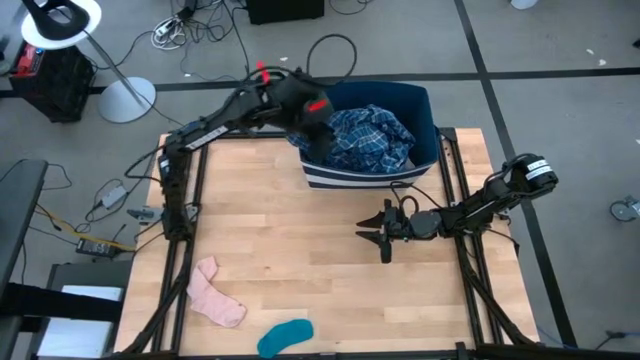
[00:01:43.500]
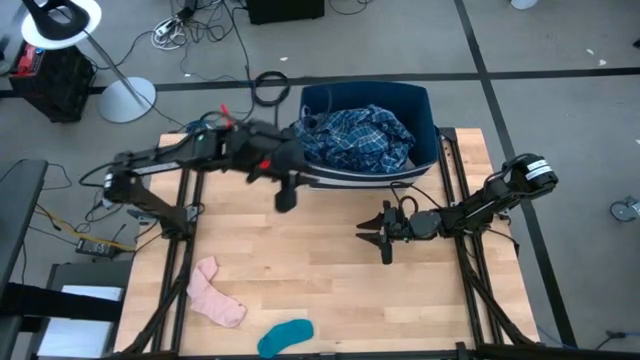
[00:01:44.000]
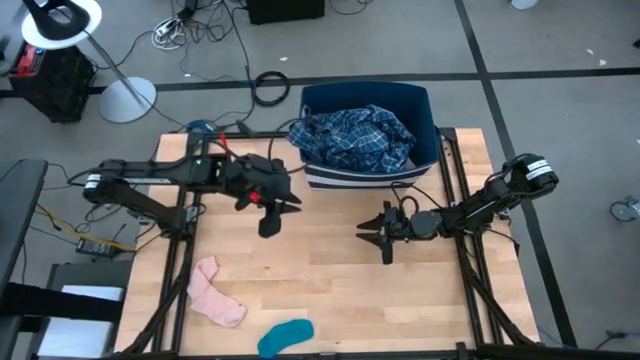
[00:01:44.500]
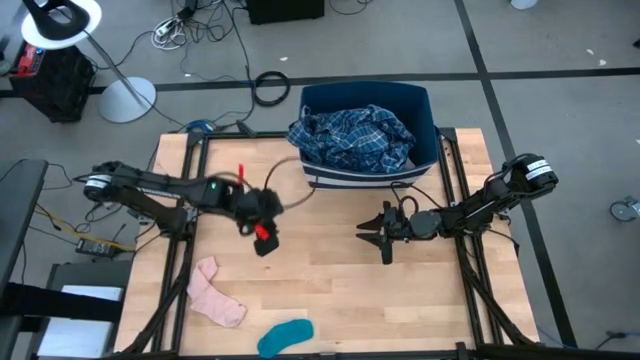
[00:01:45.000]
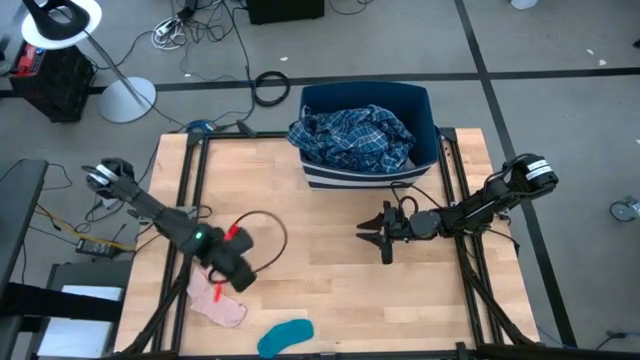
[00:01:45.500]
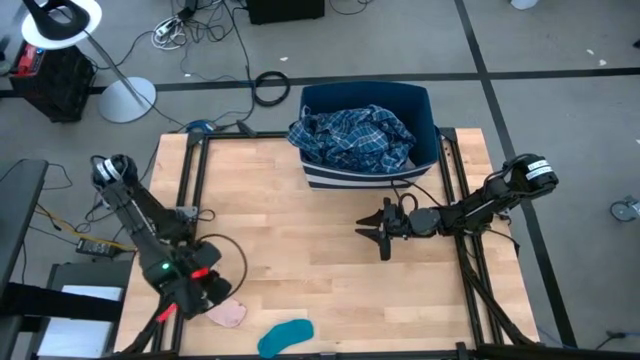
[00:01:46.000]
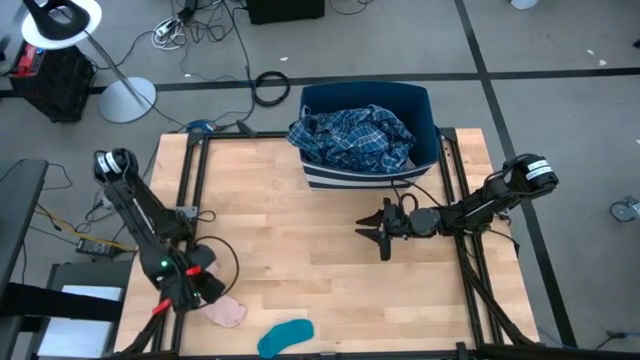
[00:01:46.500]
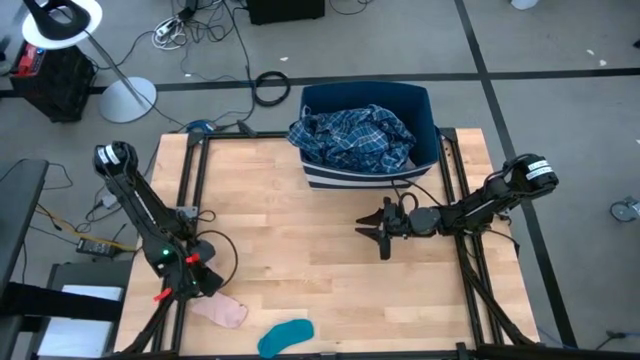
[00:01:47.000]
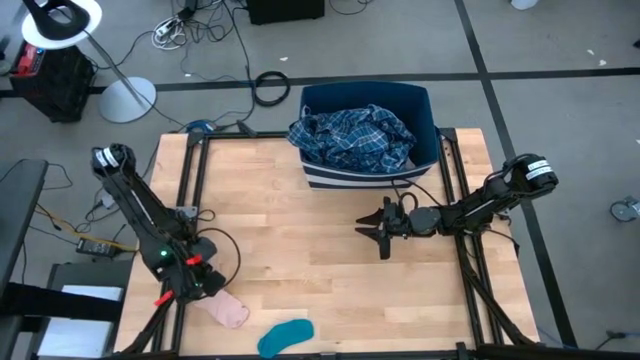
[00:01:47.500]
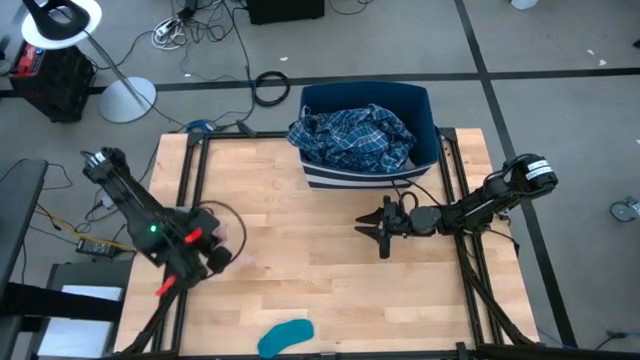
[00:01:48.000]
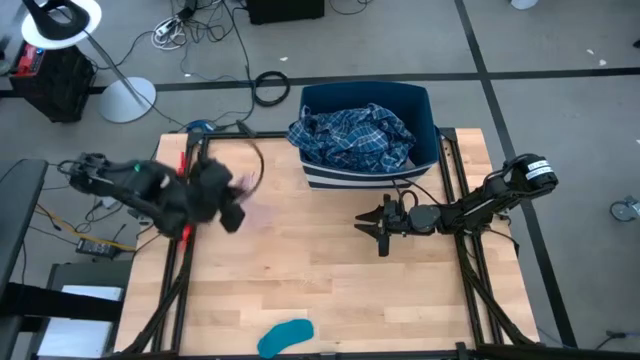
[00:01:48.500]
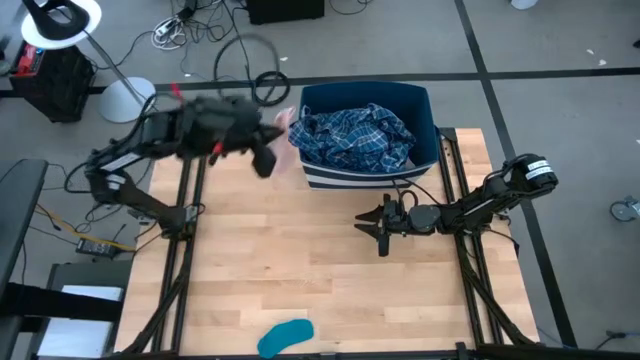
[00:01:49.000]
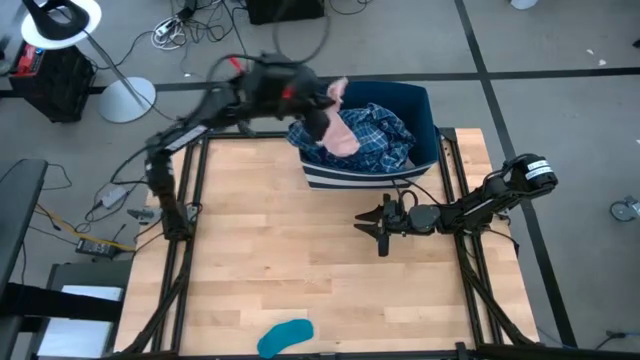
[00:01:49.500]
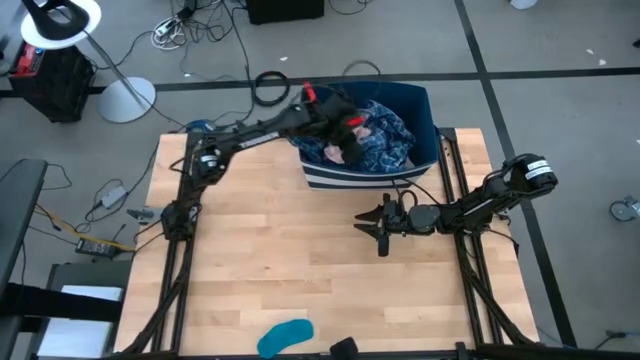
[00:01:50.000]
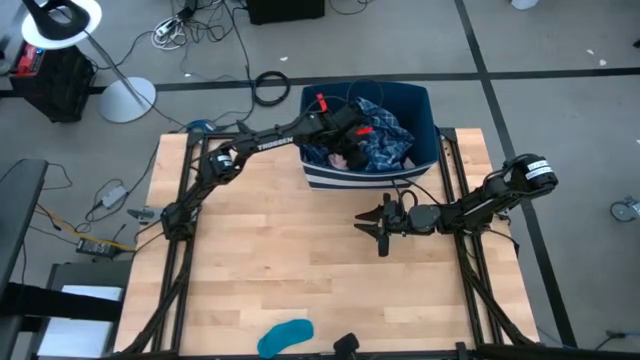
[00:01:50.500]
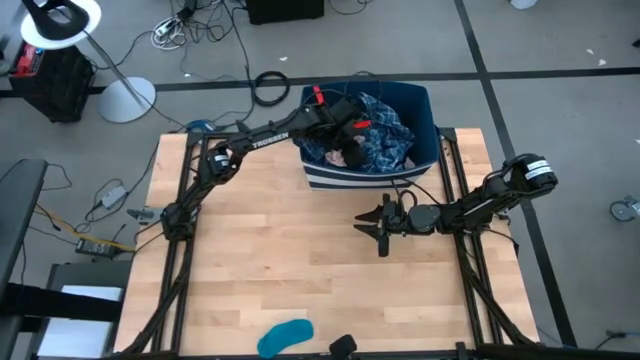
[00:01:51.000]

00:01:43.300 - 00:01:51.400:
Task: Sort clothes
Put the light pink sock into the blue bin

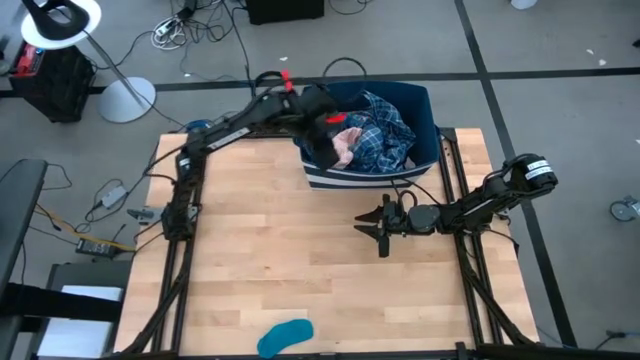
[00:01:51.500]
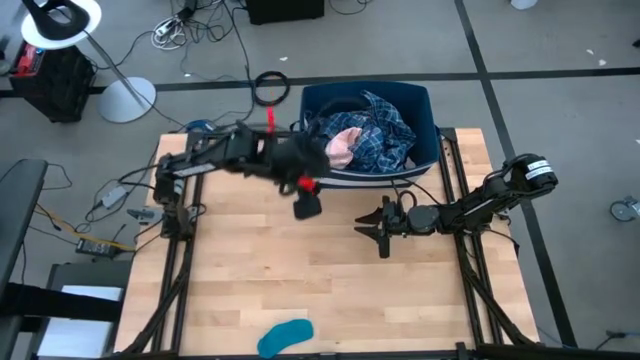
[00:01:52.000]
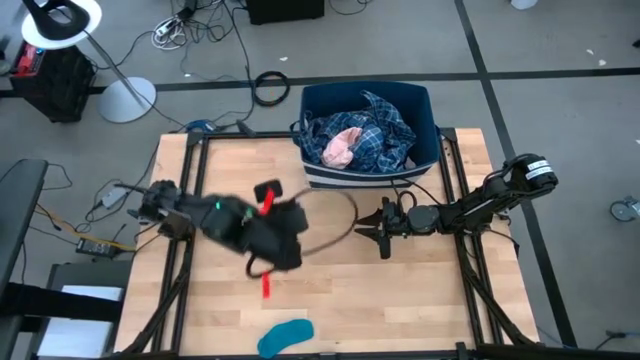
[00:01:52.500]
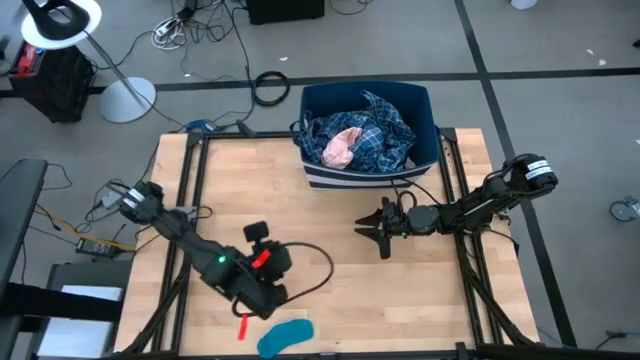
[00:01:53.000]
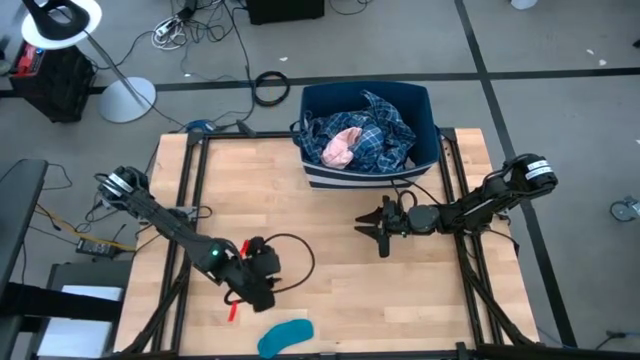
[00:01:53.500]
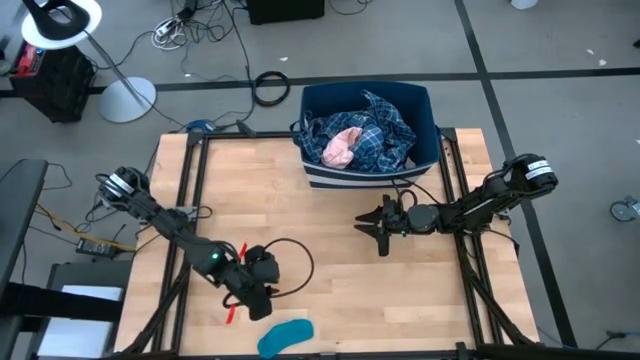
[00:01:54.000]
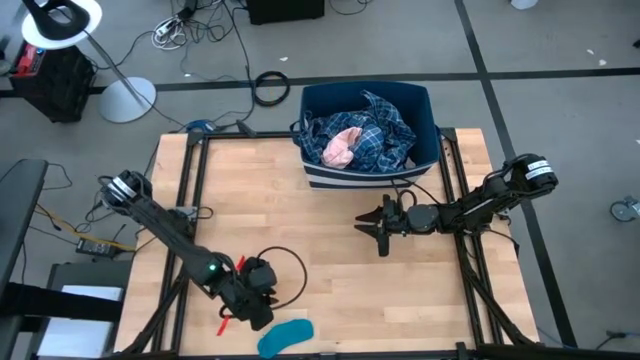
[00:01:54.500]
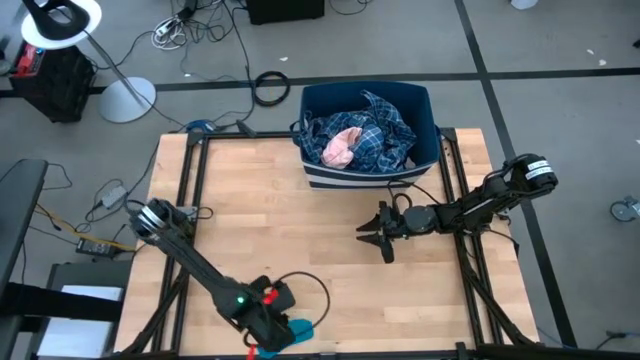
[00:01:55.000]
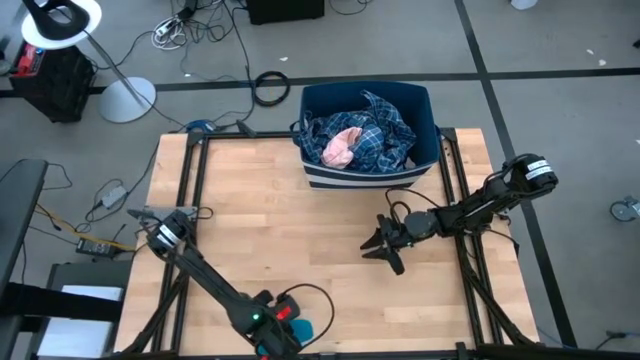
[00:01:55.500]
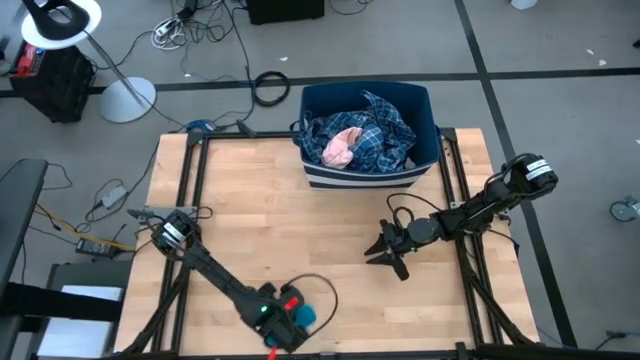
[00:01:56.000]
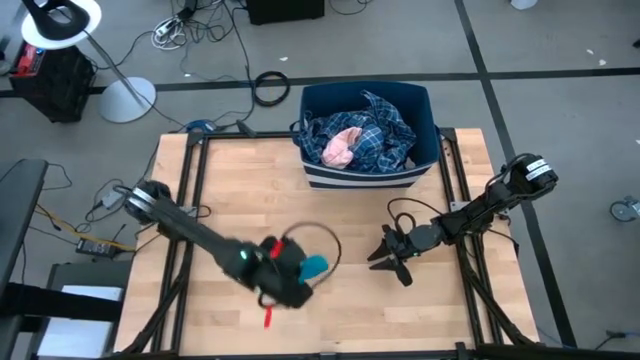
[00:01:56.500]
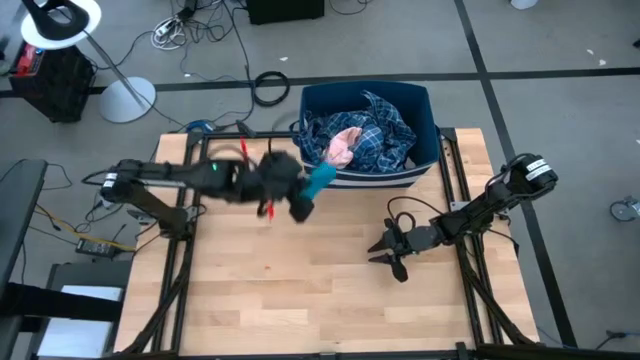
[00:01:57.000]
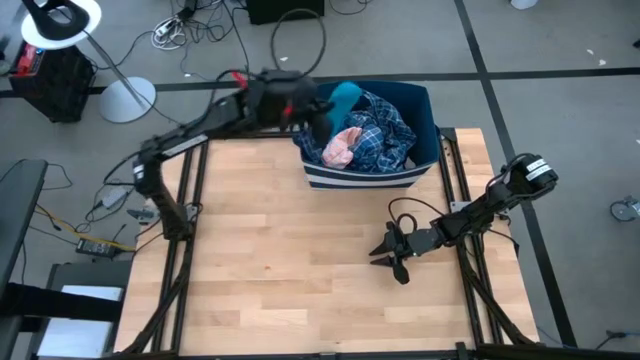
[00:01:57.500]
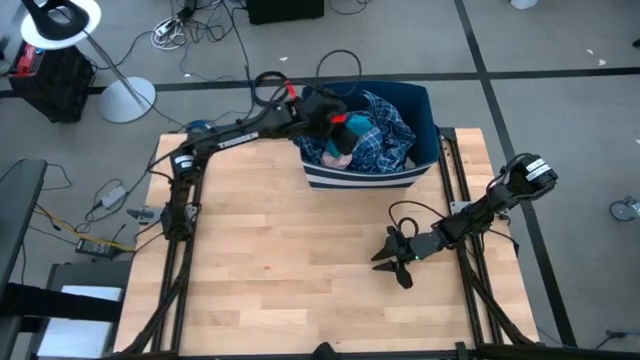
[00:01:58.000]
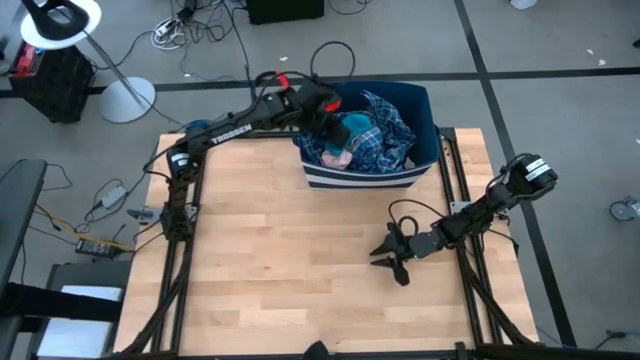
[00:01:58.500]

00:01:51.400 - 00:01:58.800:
Put the blue sock into the blue bin

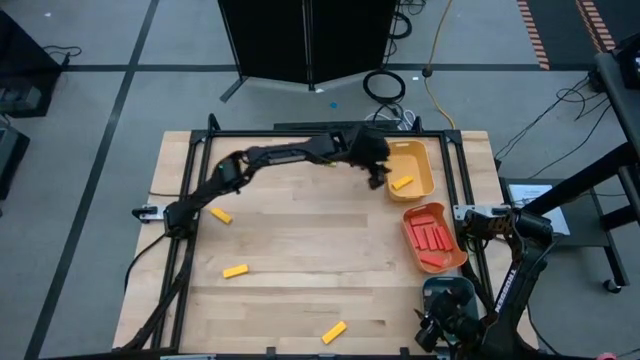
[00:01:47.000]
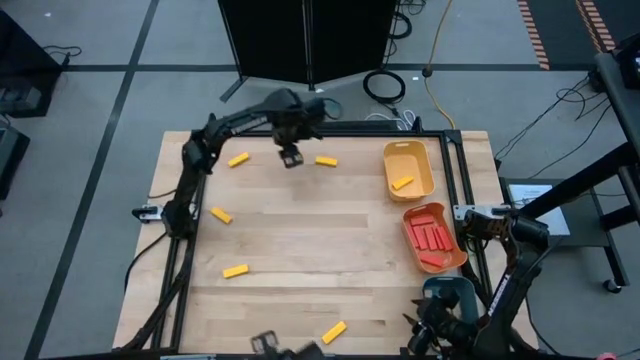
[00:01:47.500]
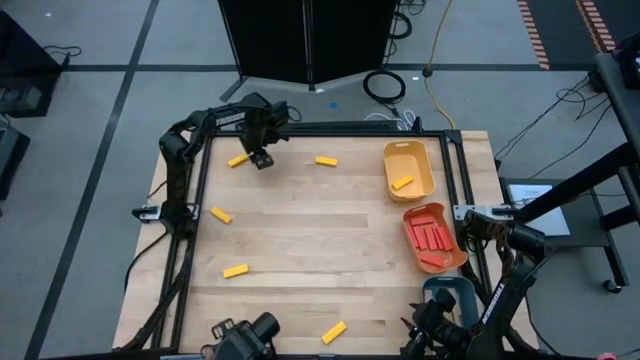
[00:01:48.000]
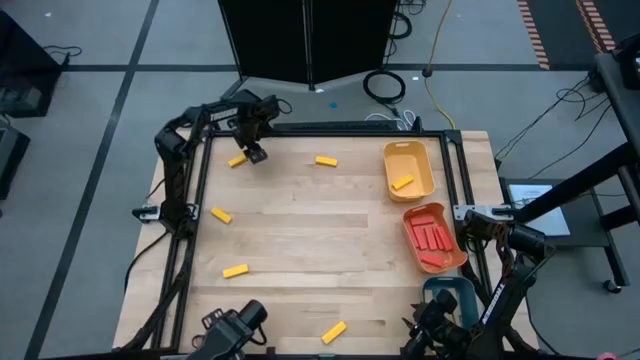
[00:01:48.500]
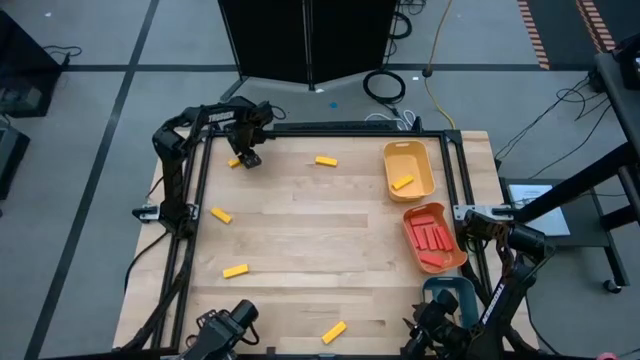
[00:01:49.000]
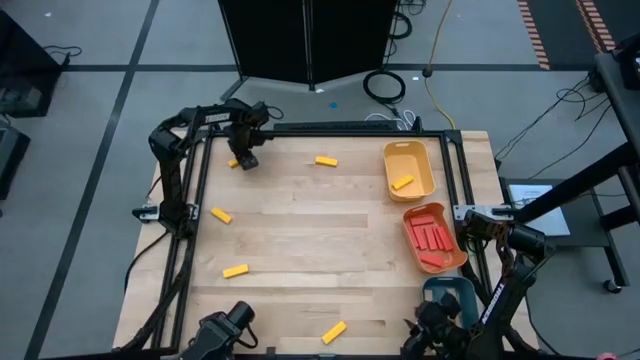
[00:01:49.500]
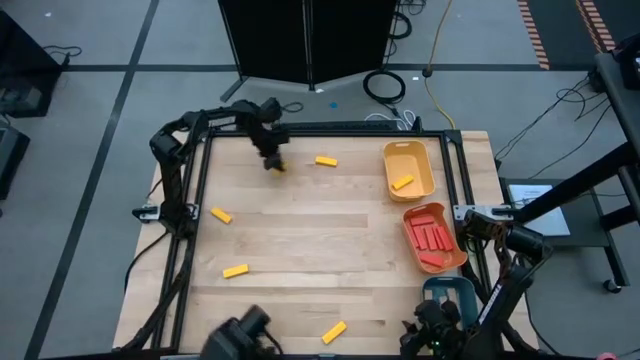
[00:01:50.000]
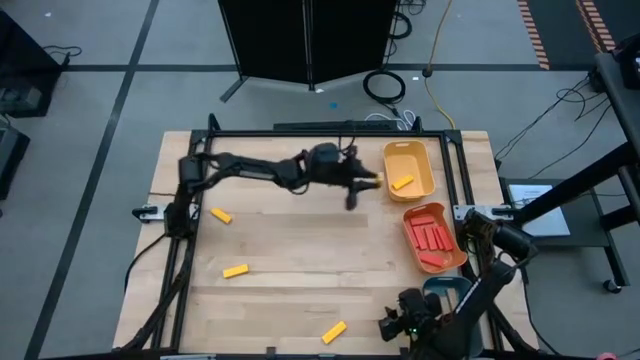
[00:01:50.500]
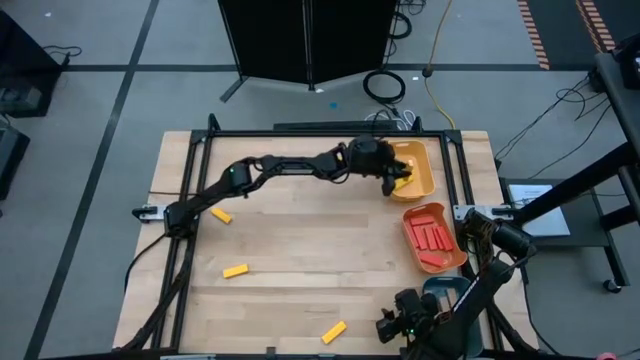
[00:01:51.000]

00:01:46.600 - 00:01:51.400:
Task: Sort blocks
Put the yellow block into the yellow bin
